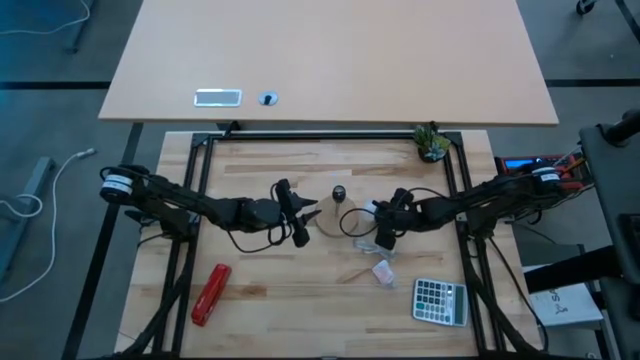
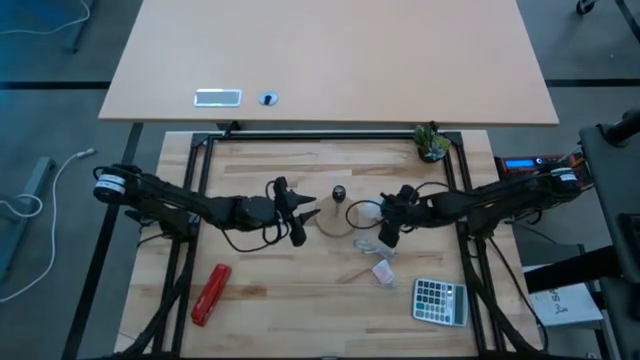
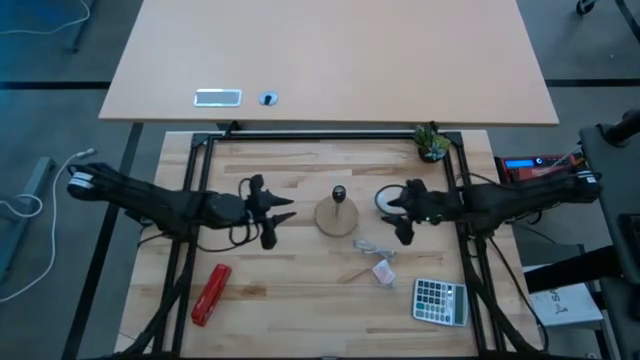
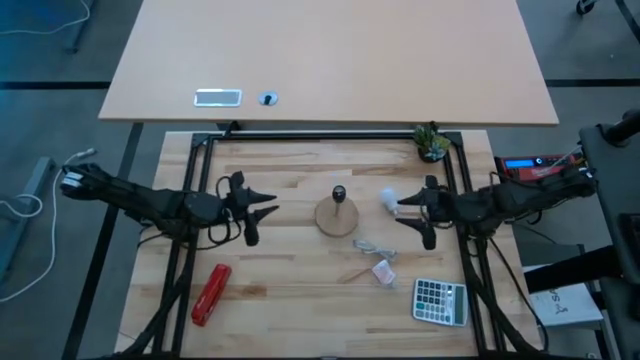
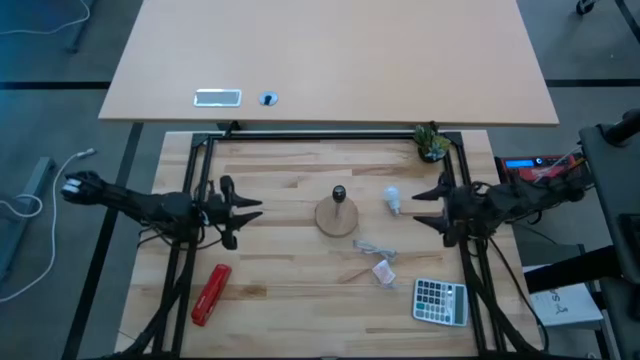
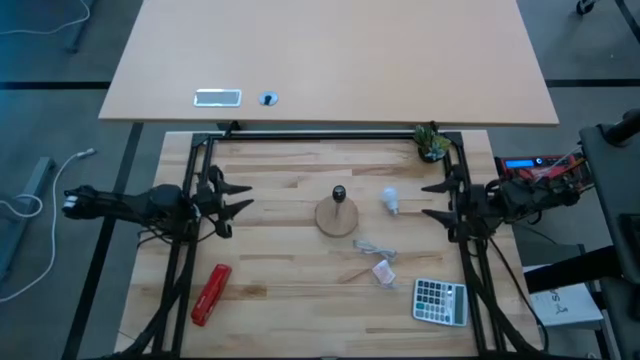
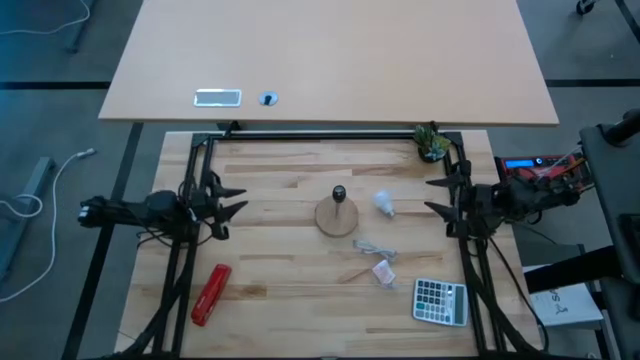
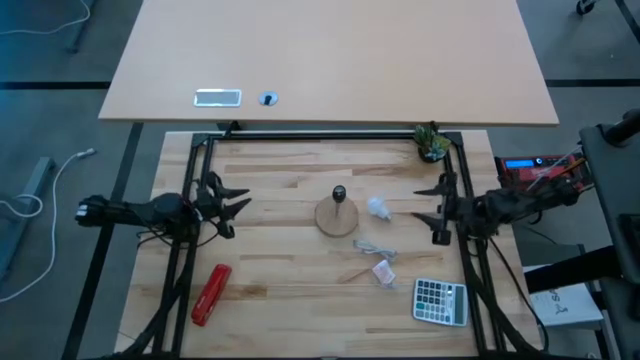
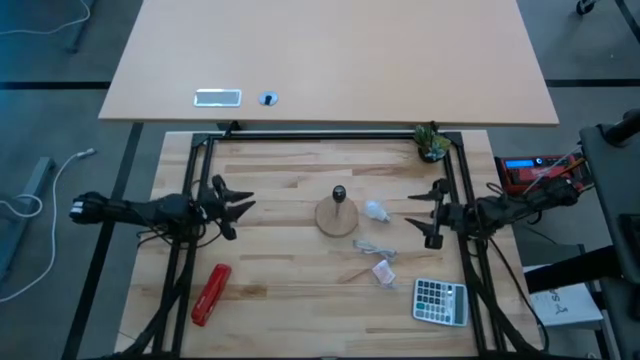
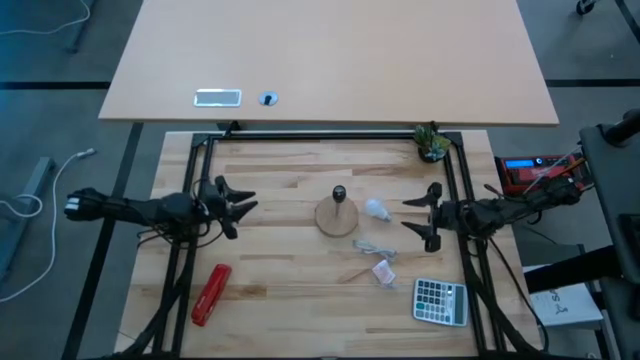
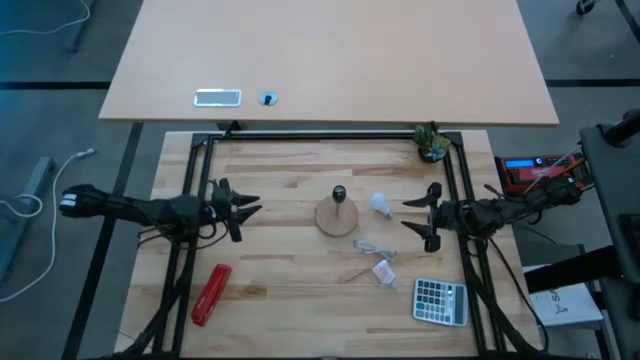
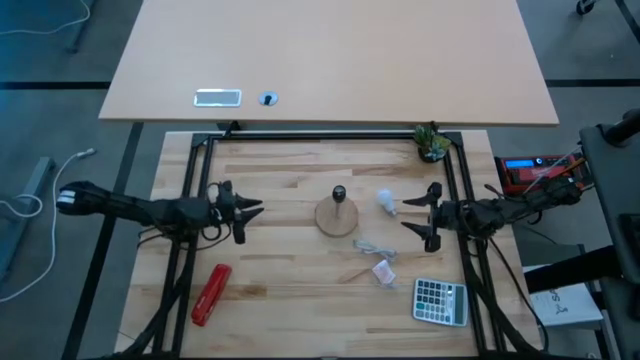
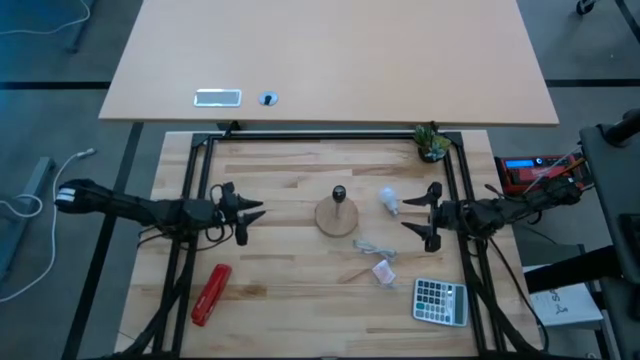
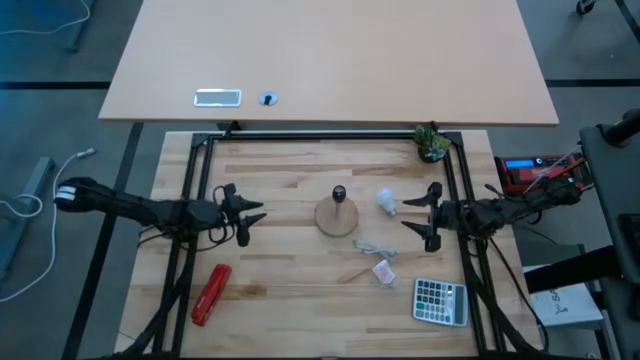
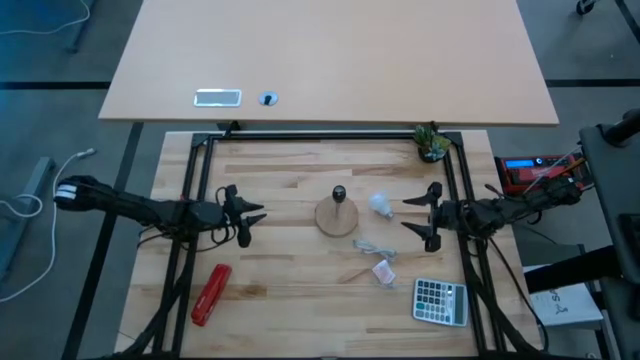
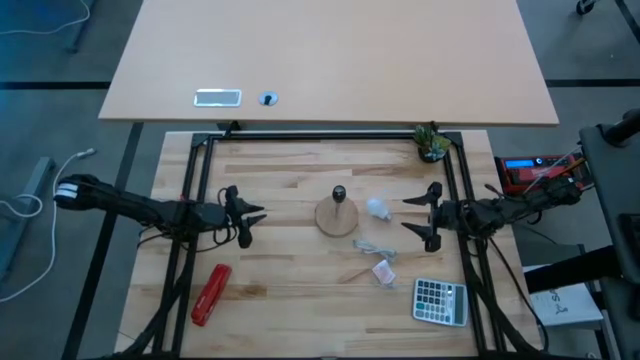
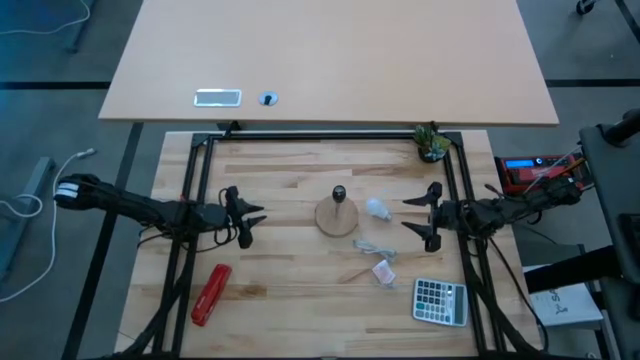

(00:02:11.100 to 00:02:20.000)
Task: Screw lightbulb
Return to Home Position

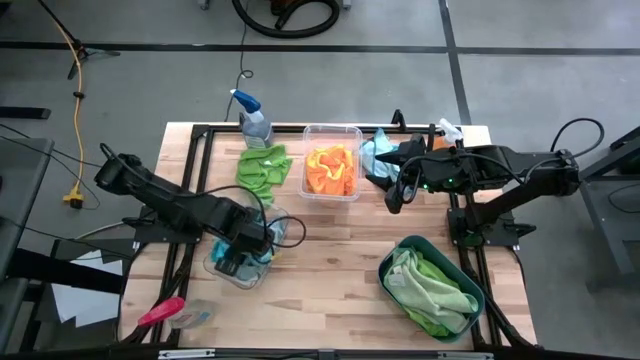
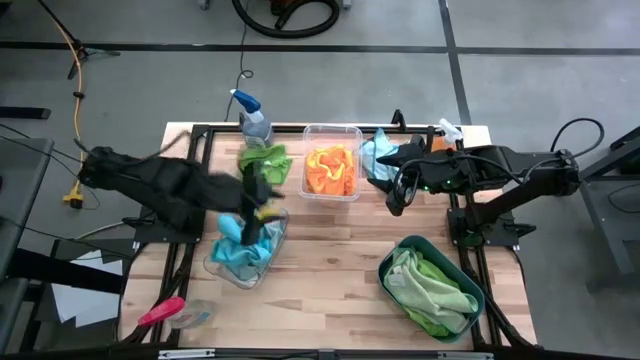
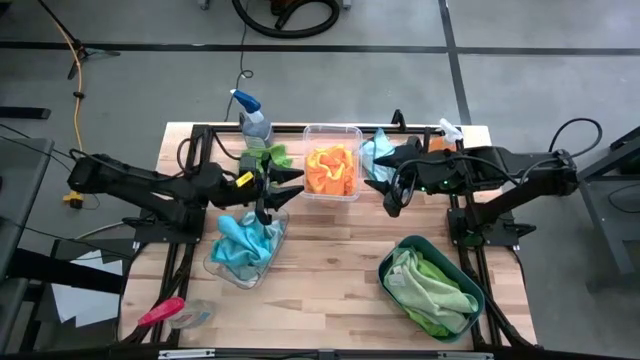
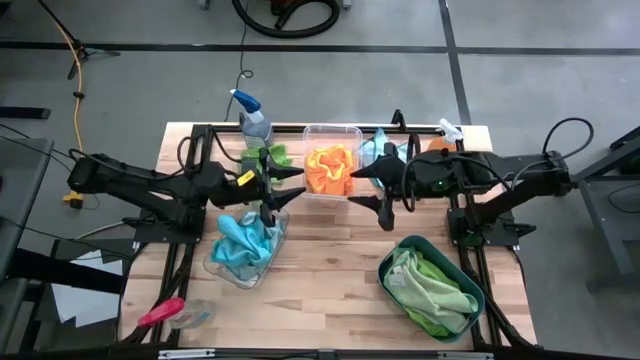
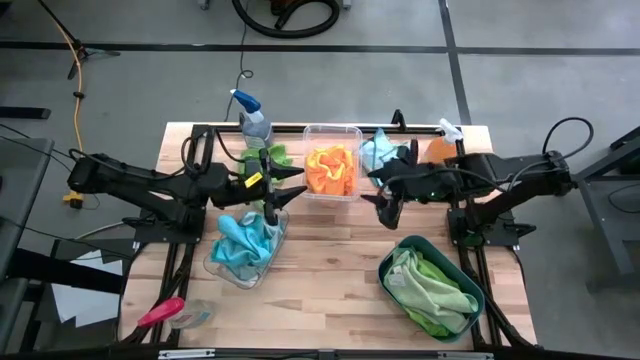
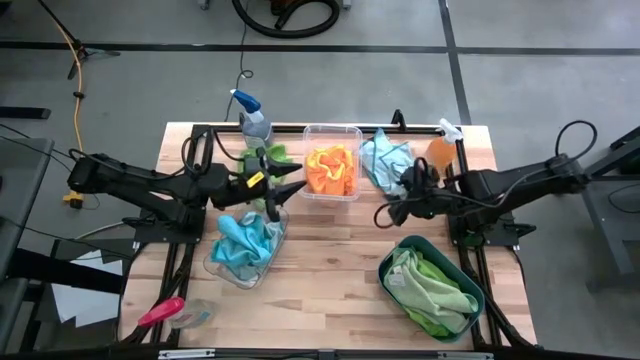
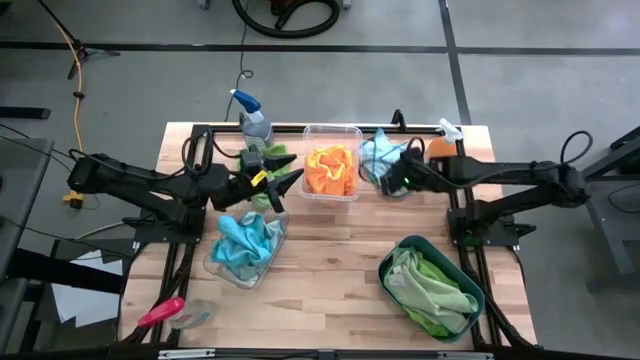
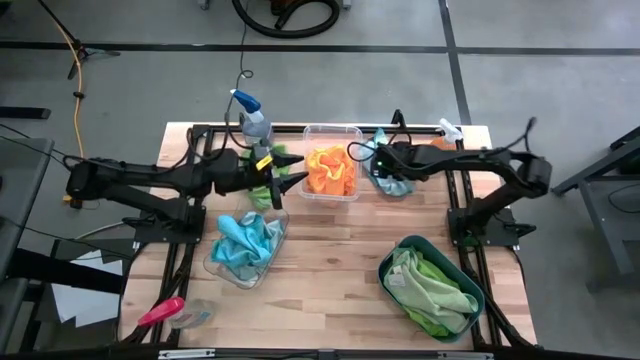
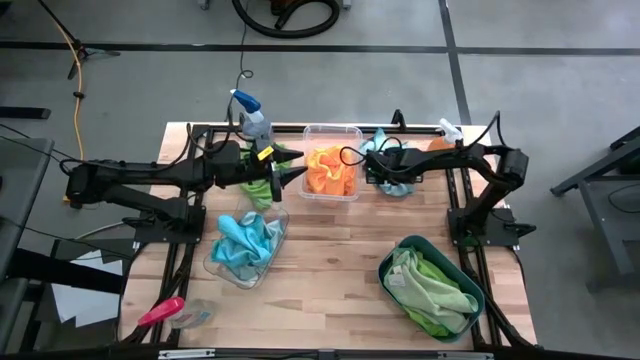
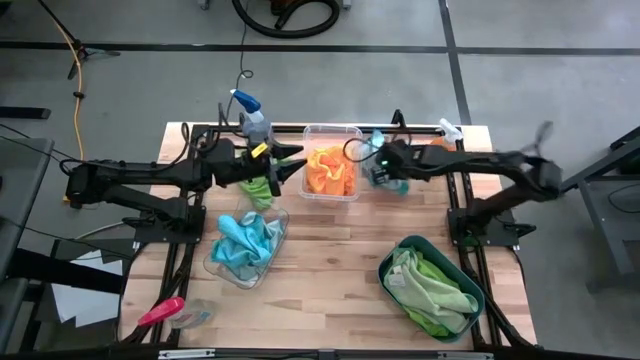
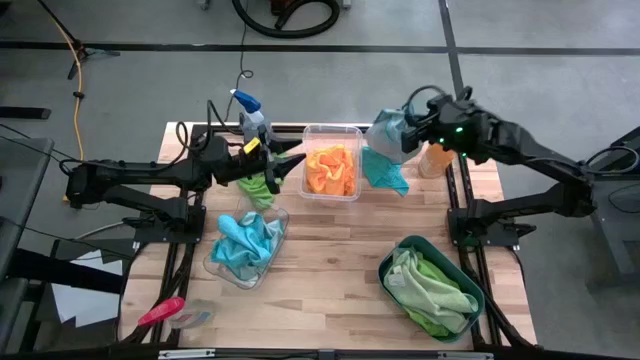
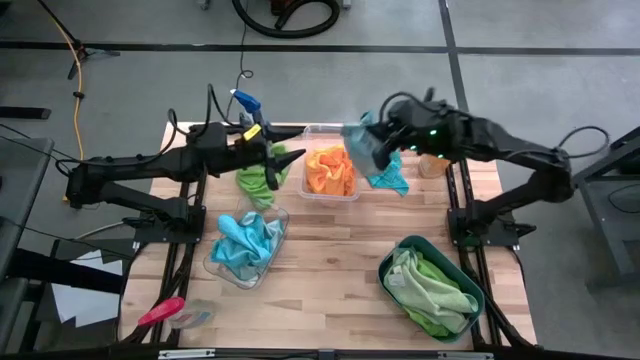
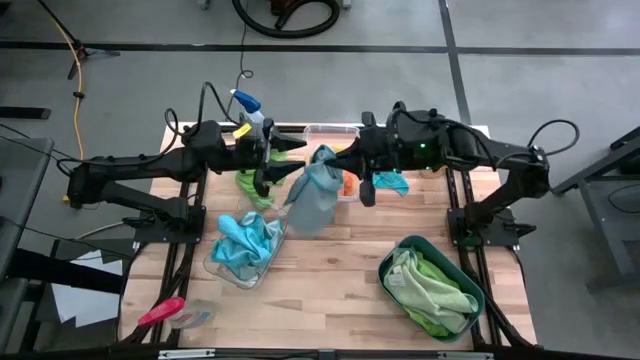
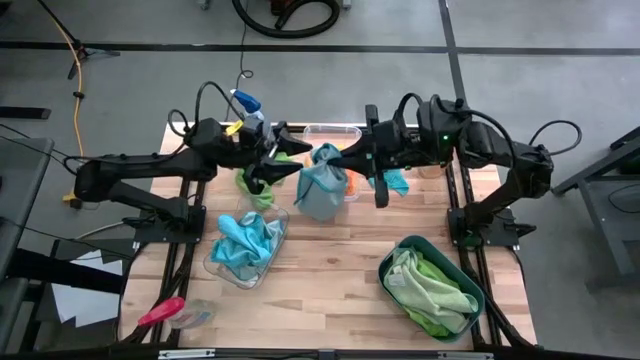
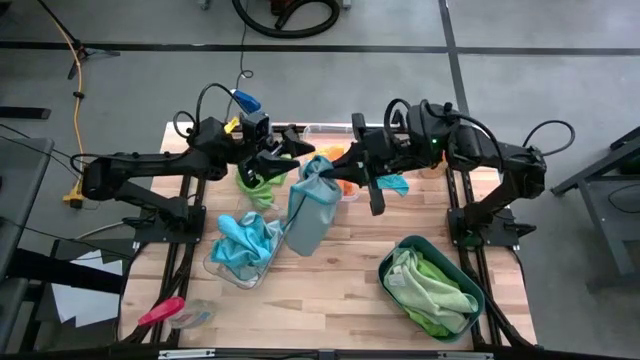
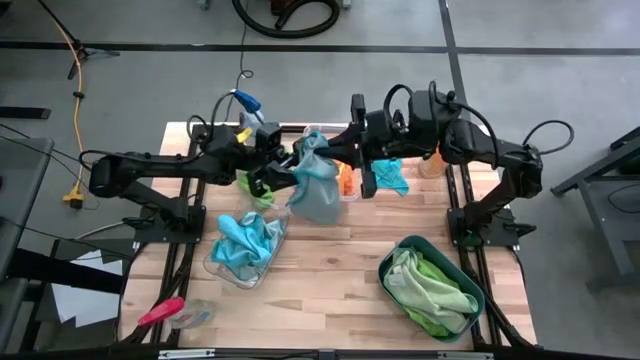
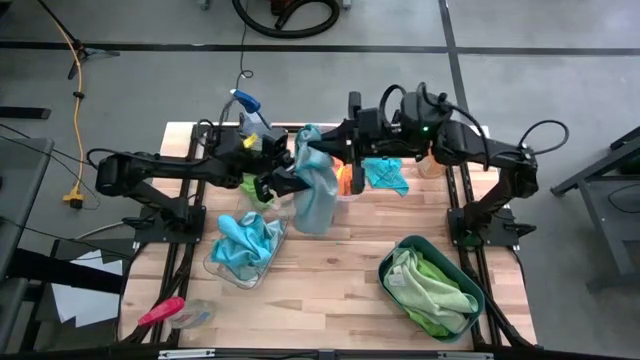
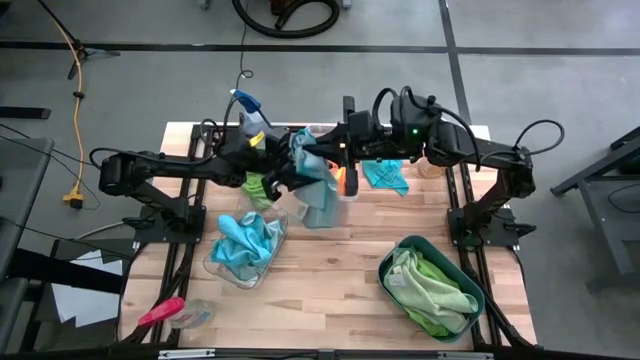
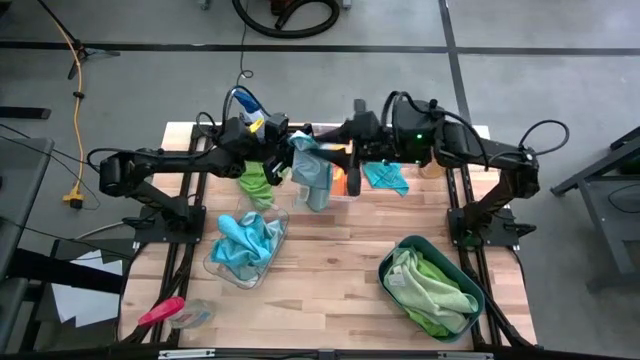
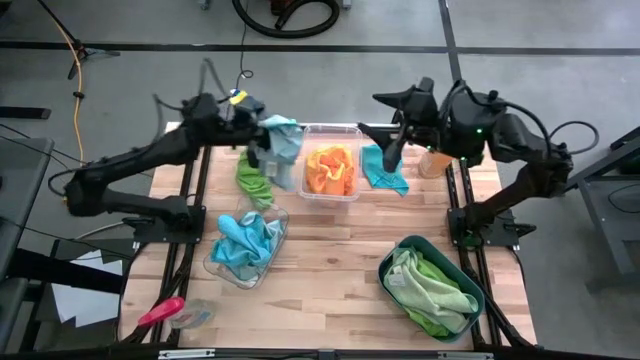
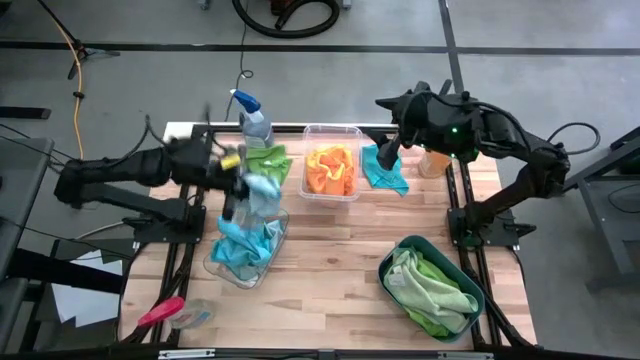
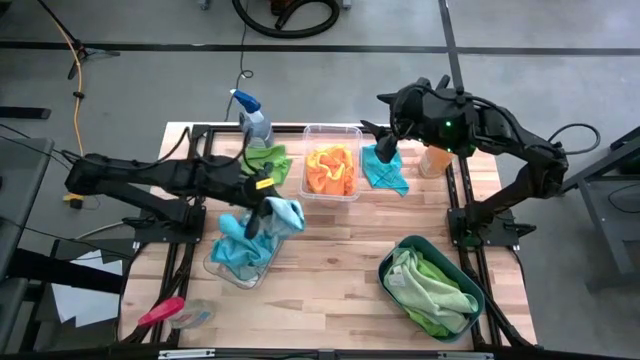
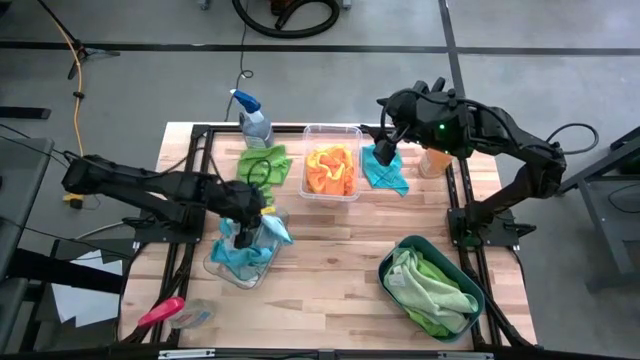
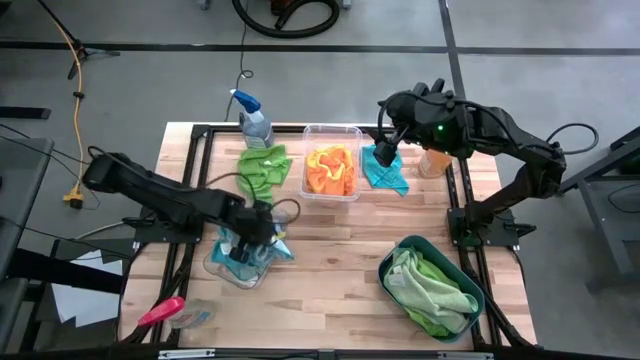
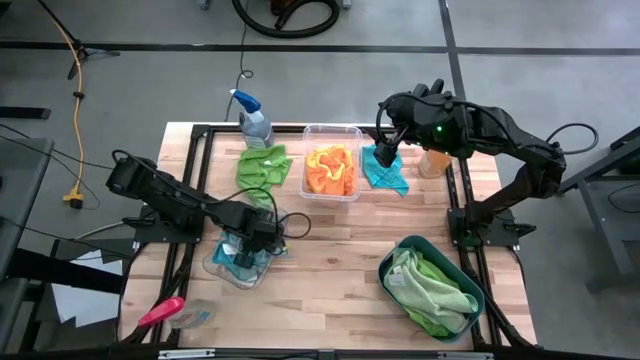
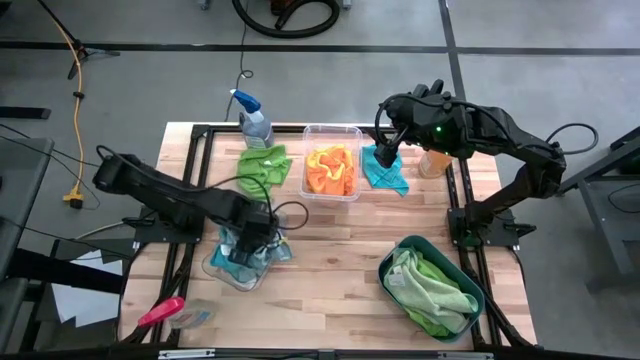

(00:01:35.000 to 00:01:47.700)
Task: Sort microfiber towel by color & place in baskets
Put the light blue microfiber towel into the bottom transparent bin
